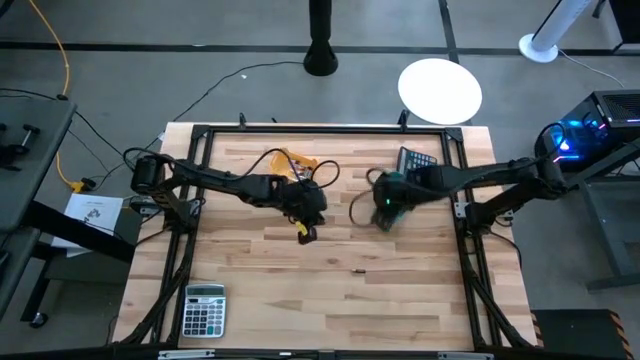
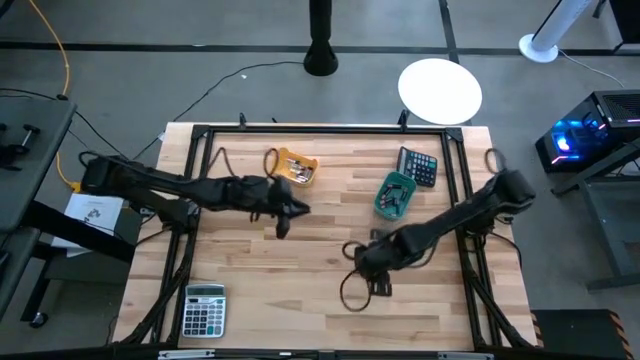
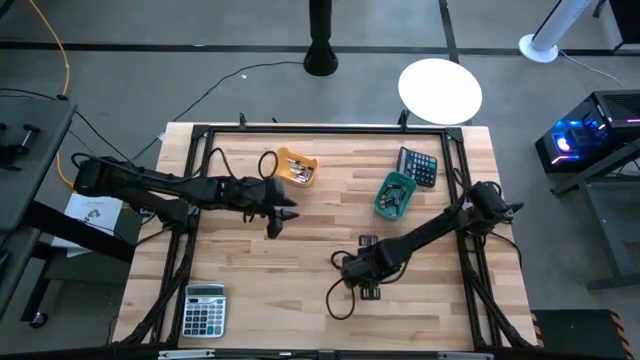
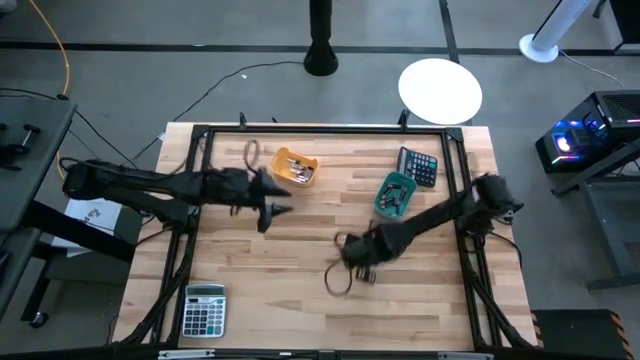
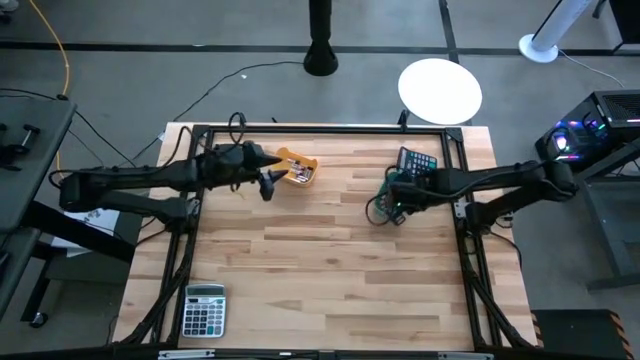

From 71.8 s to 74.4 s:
Task: Sort batteries
Put the black battery into the blue bin

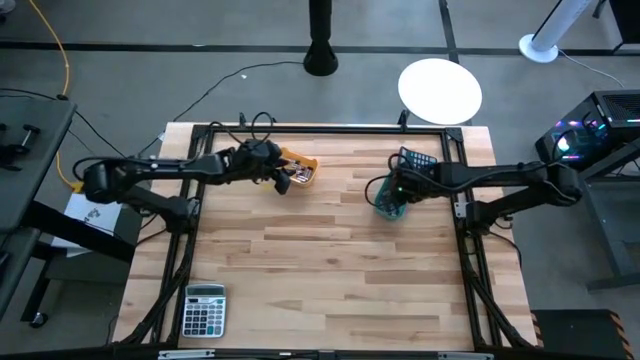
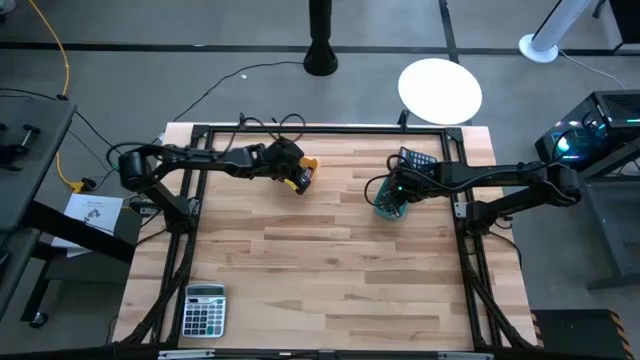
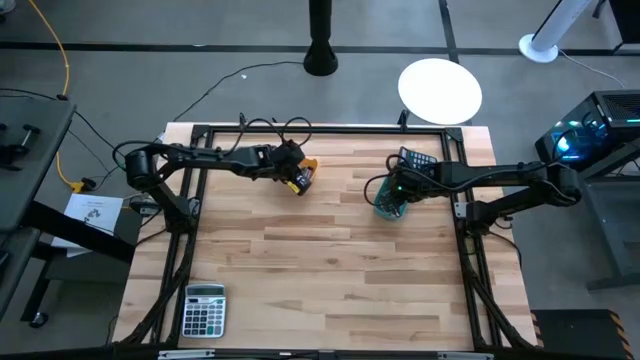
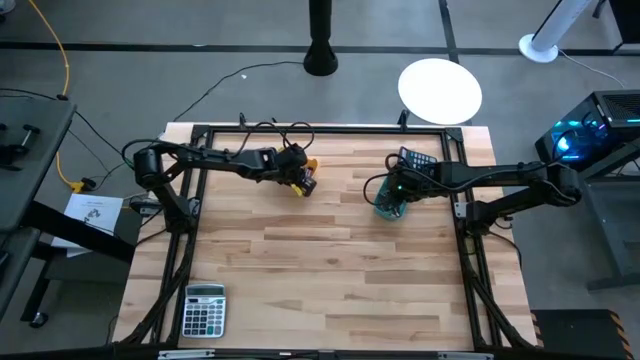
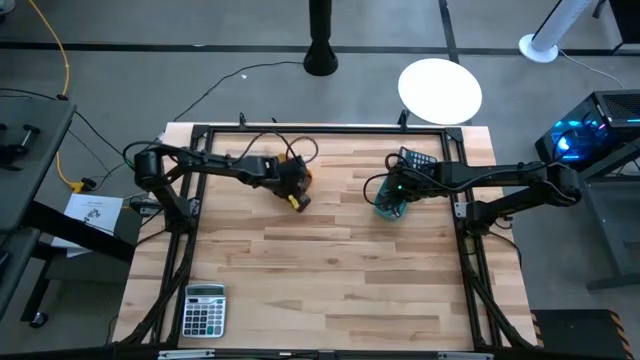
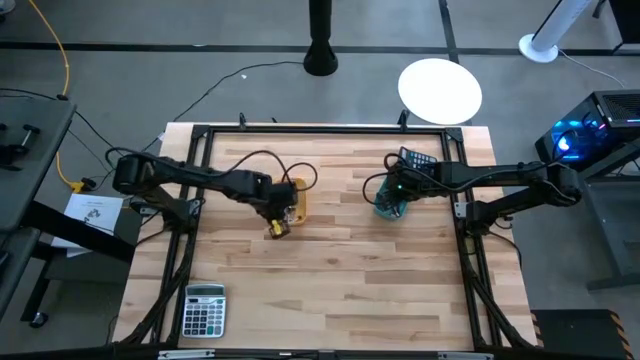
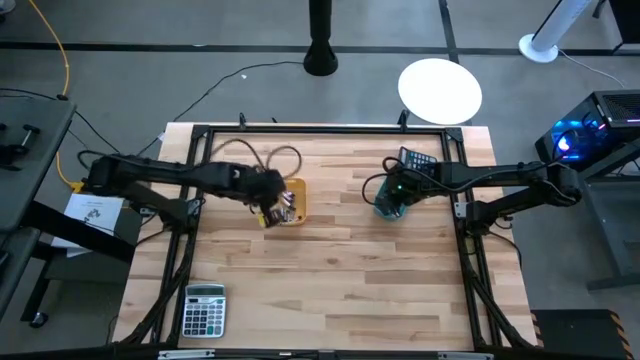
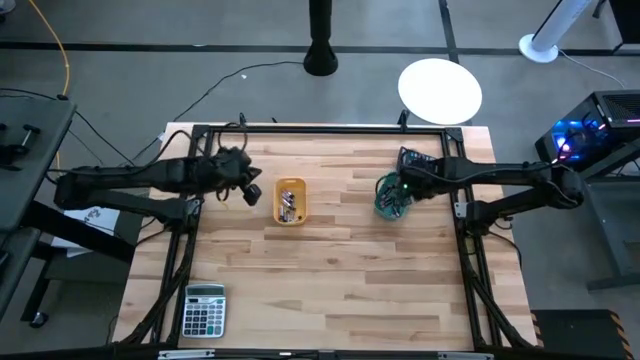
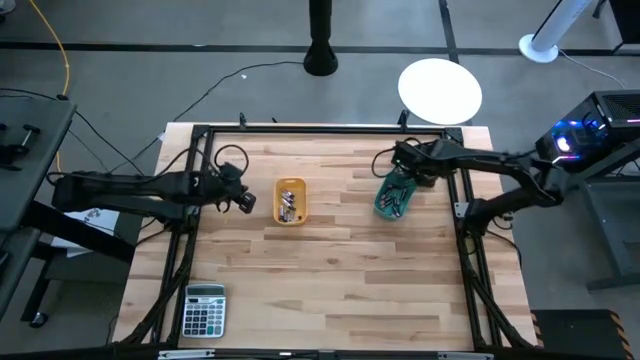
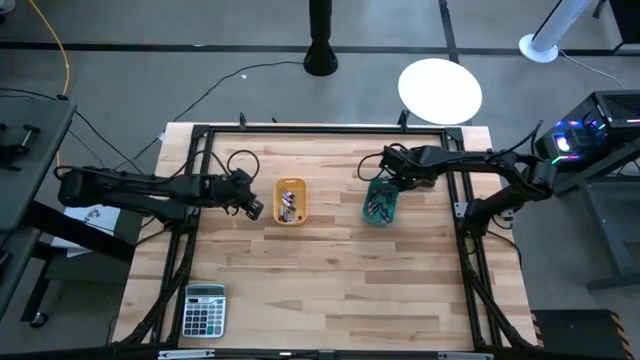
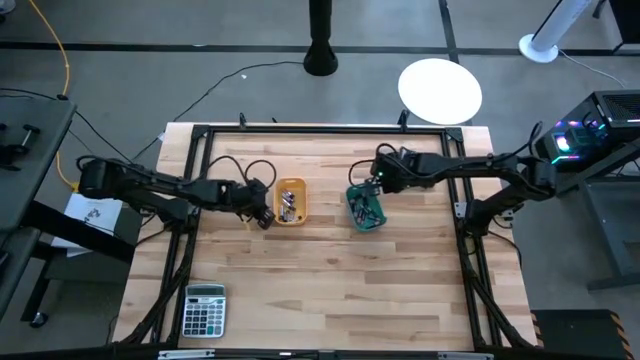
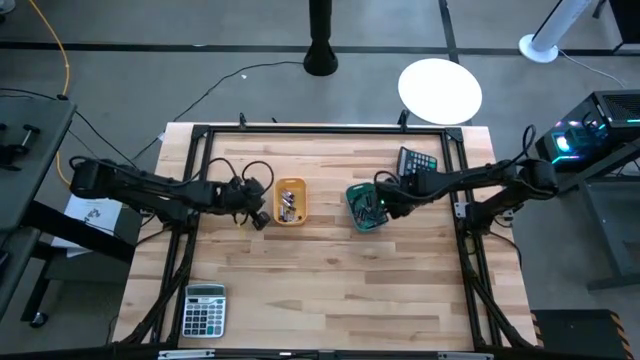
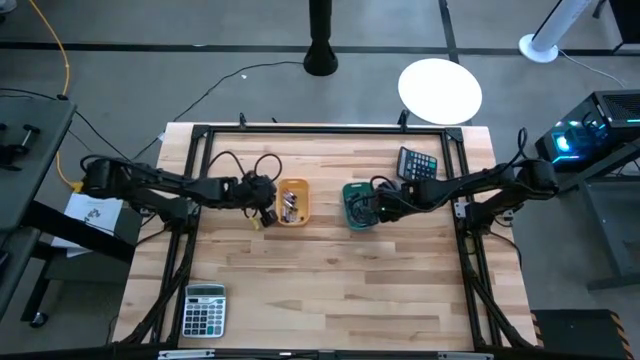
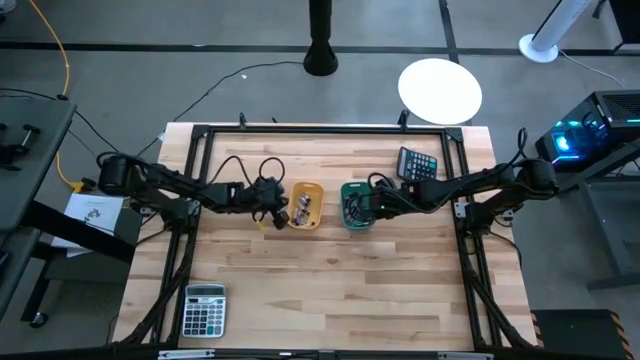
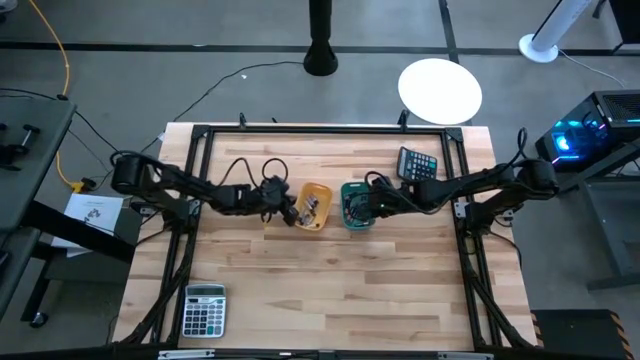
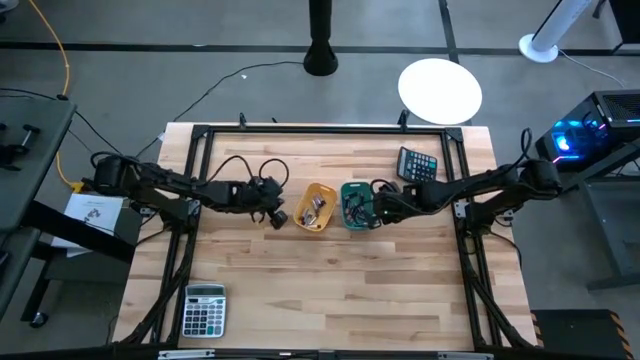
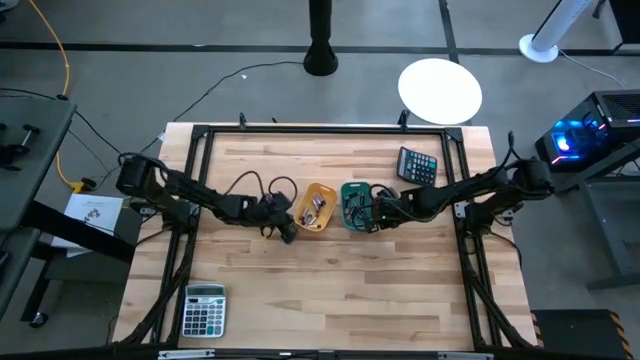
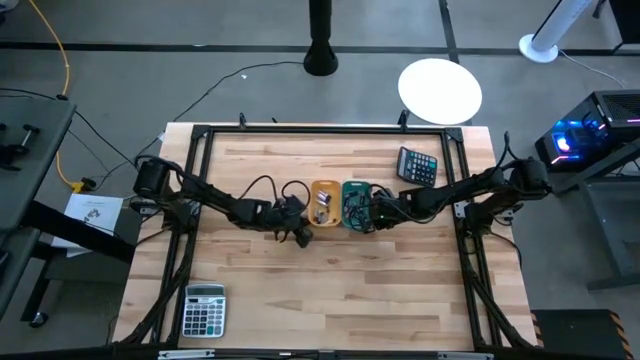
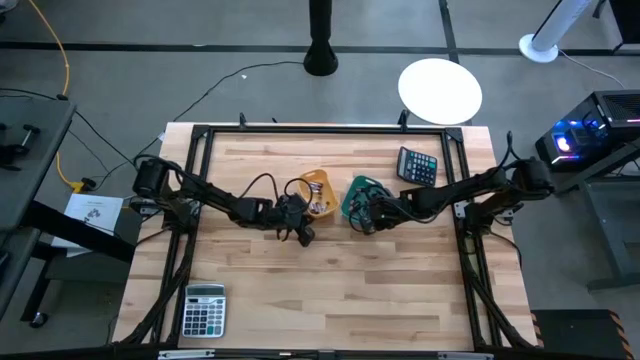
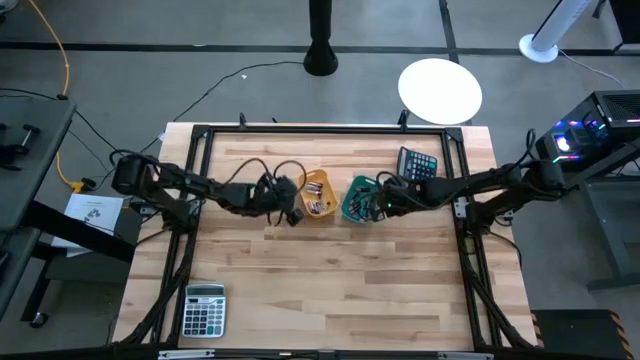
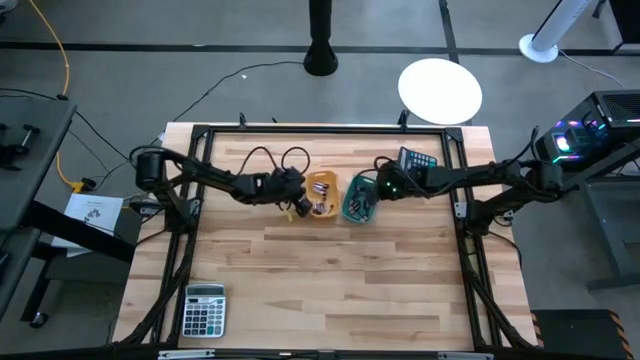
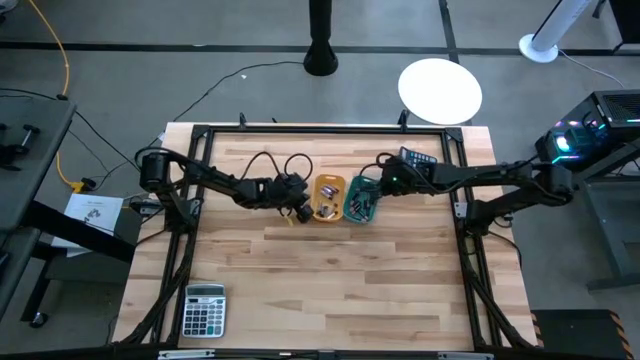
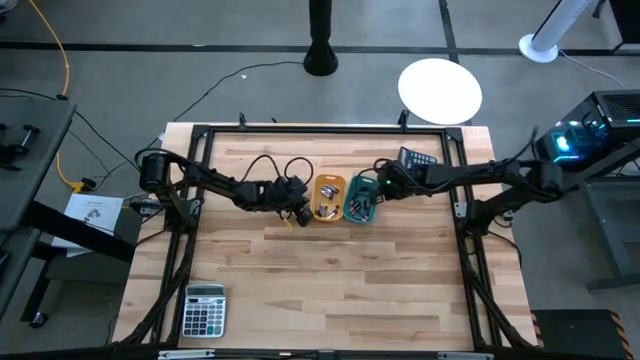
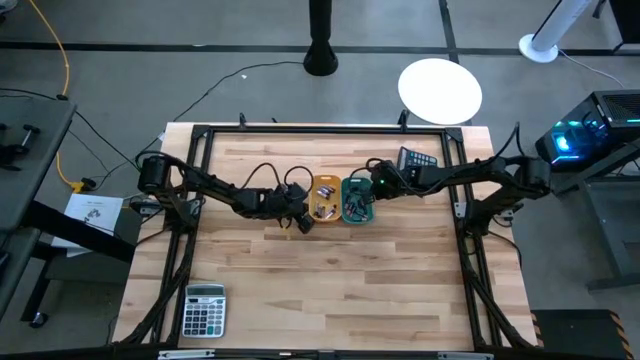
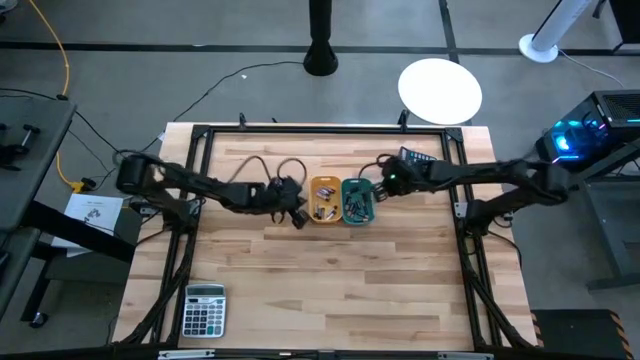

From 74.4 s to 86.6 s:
Adjust the bins on the table

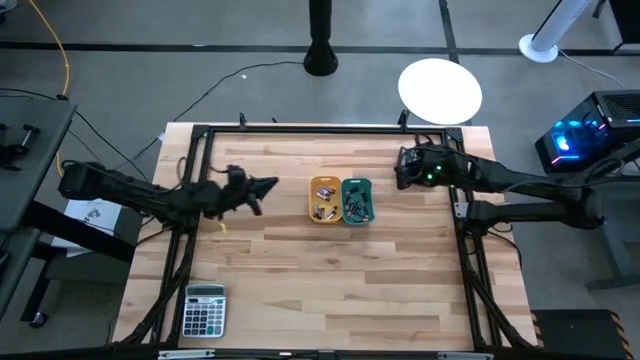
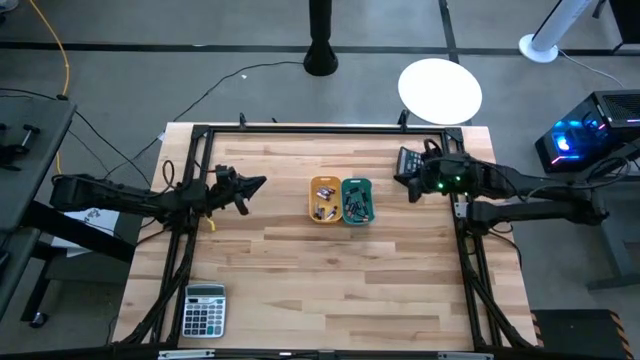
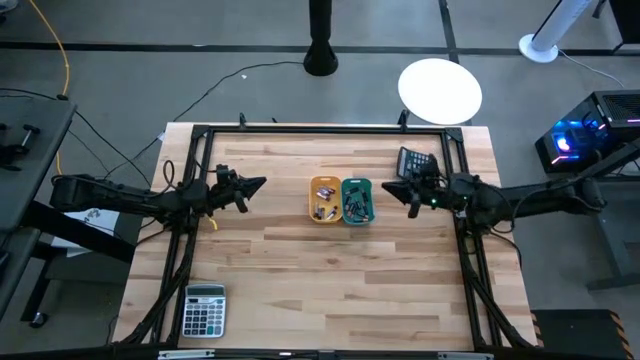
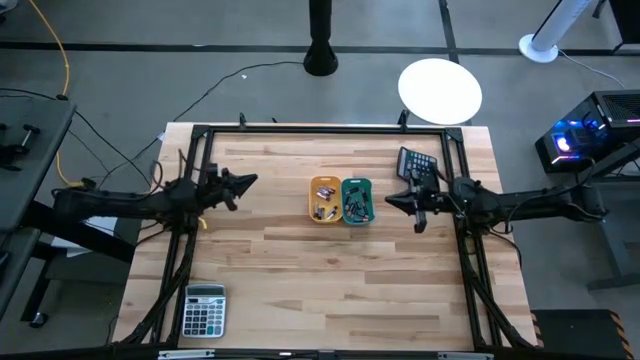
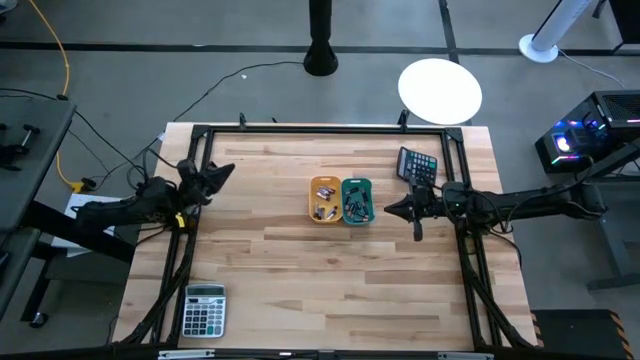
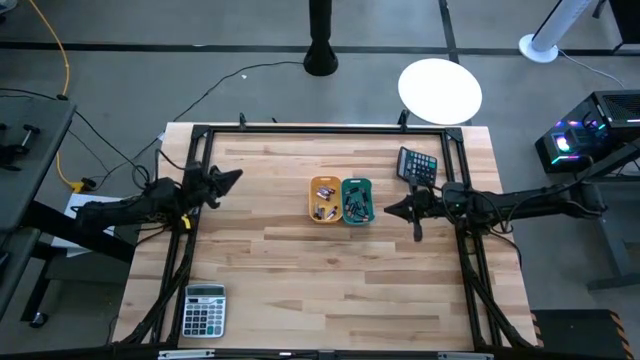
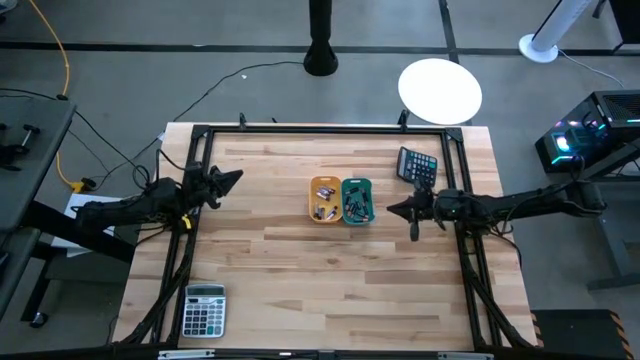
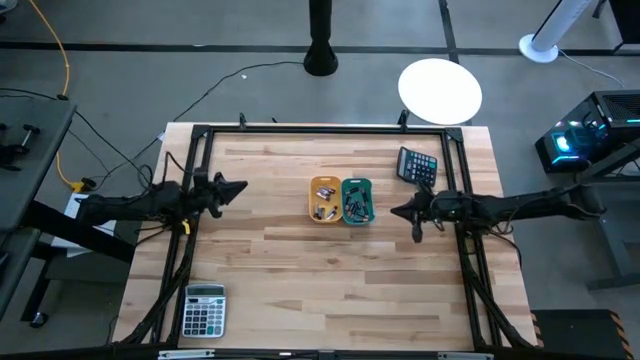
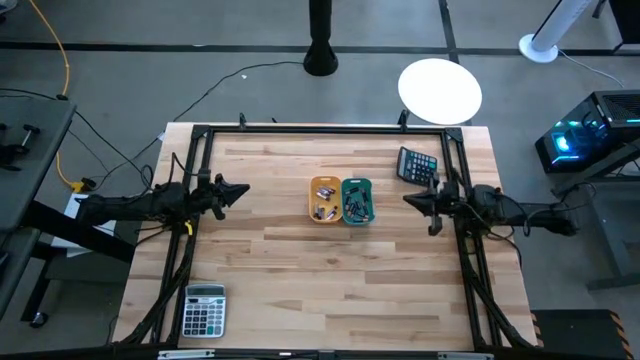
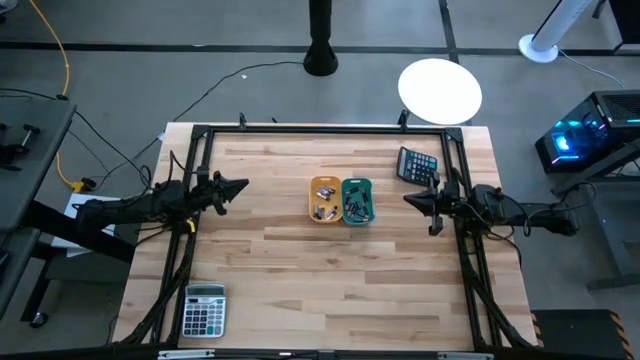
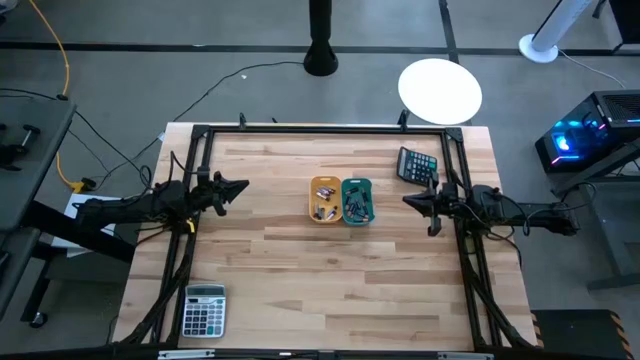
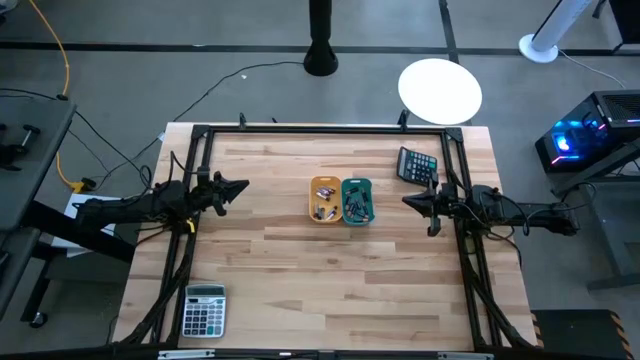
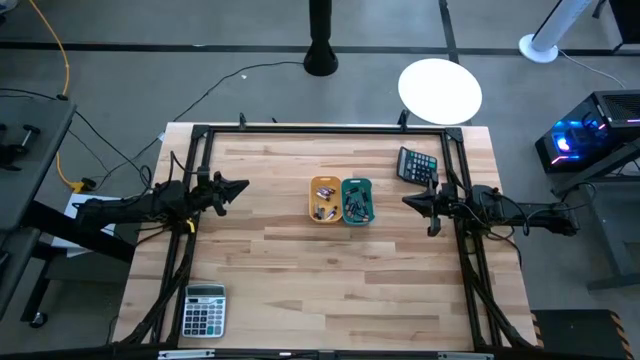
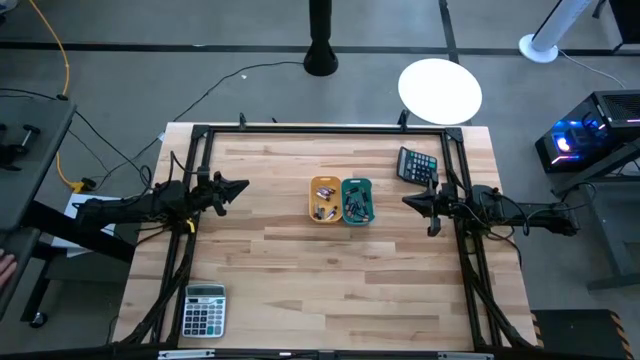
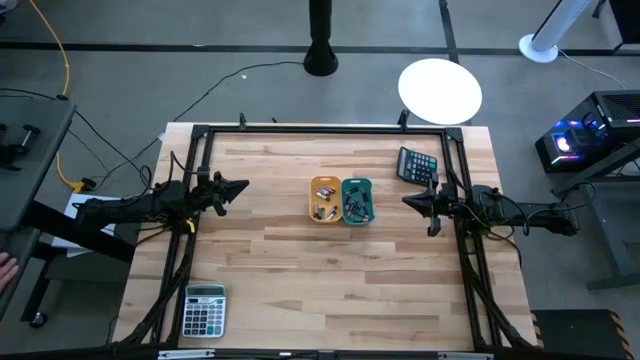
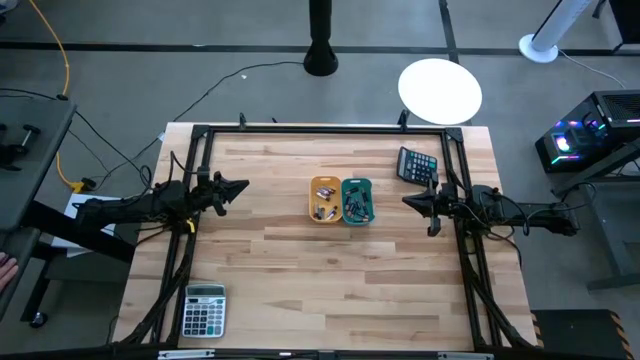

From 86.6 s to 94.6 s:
Return to Home Position
